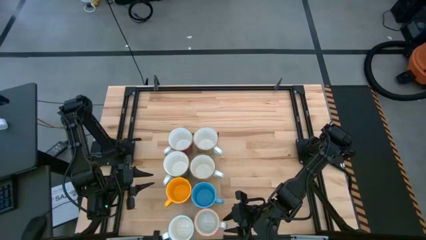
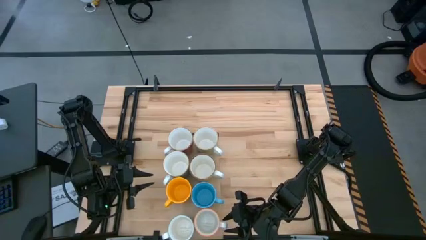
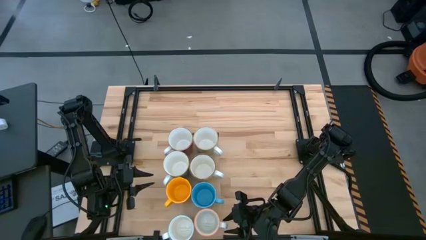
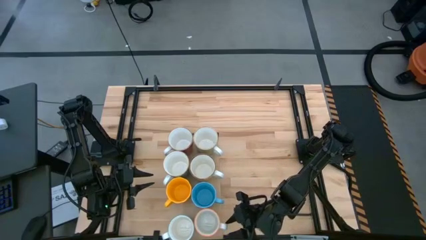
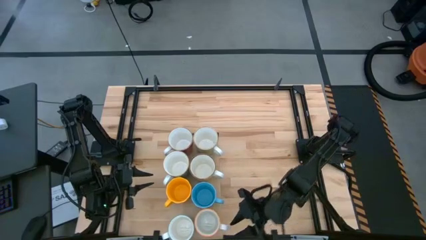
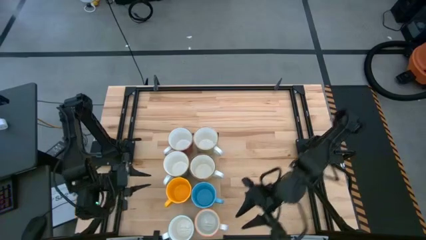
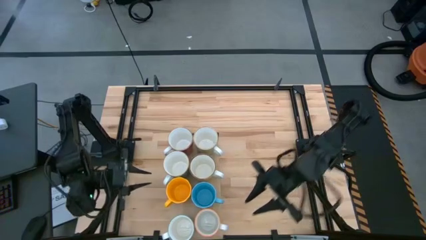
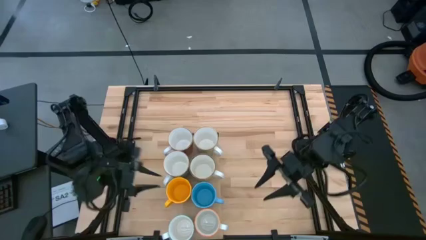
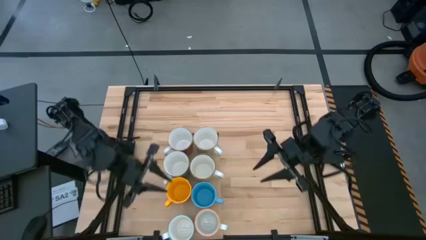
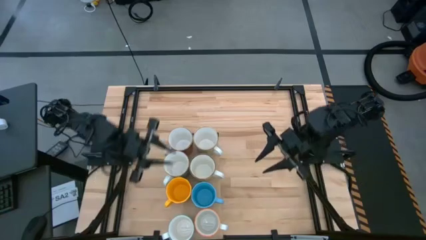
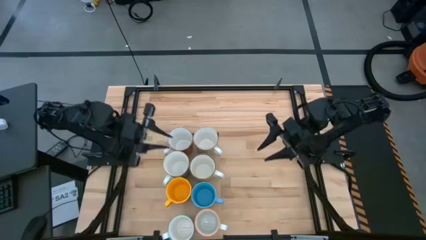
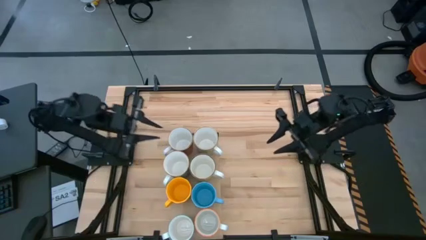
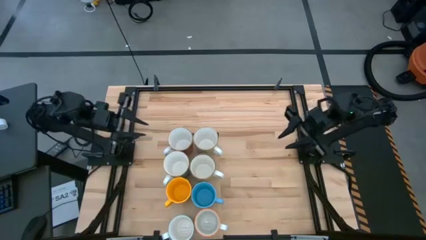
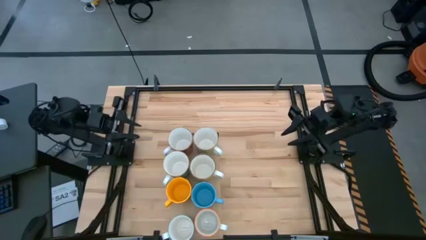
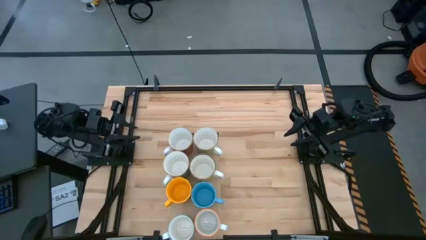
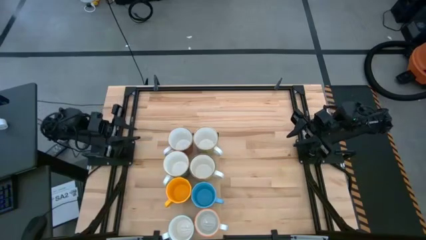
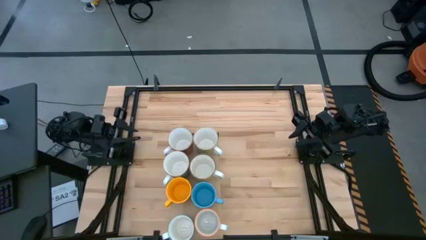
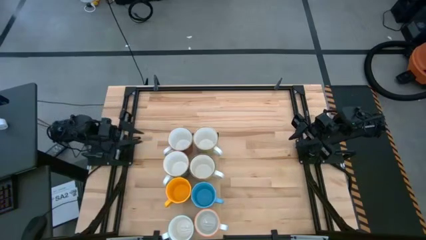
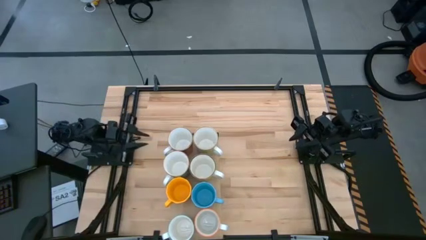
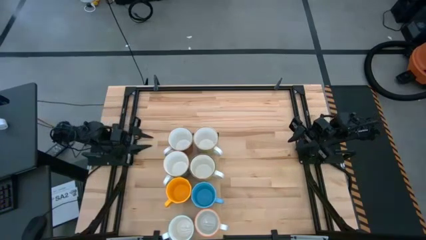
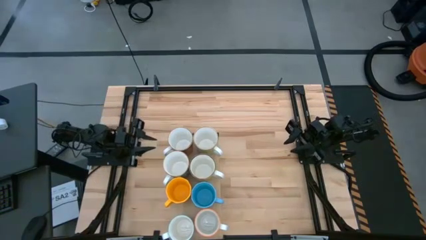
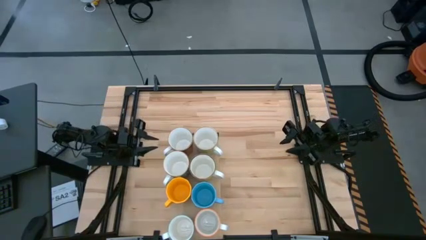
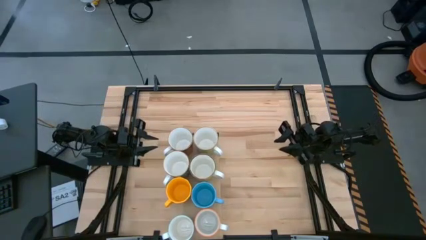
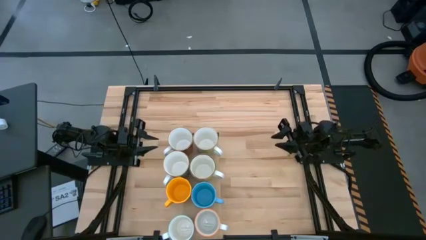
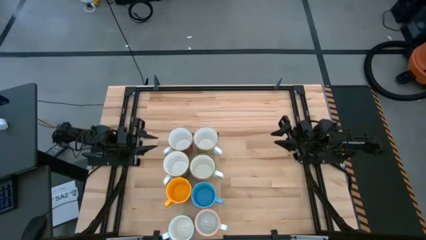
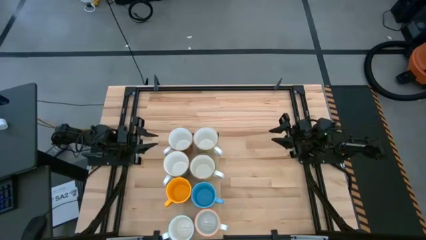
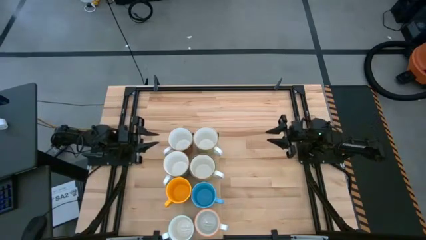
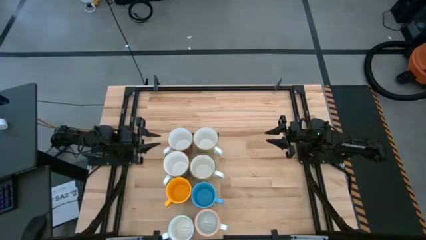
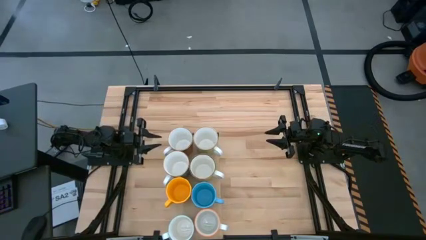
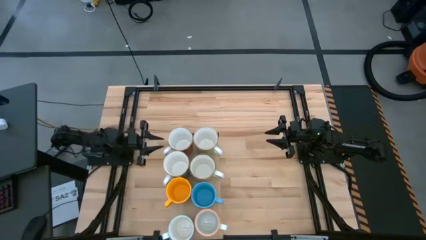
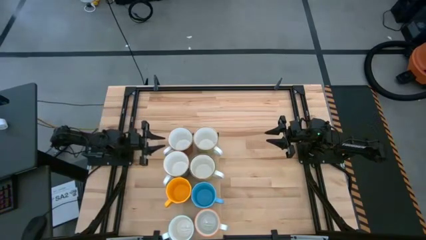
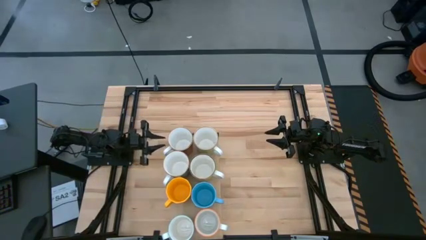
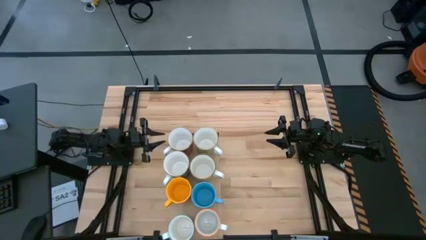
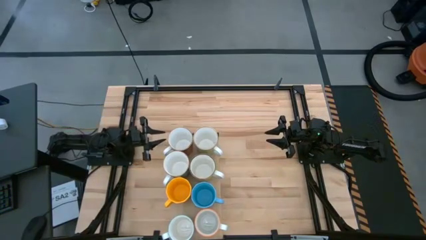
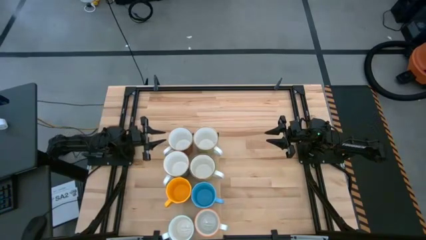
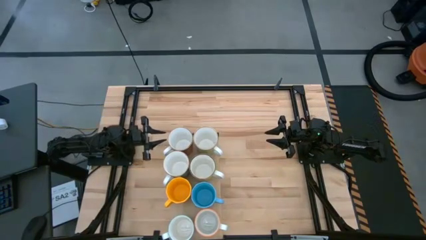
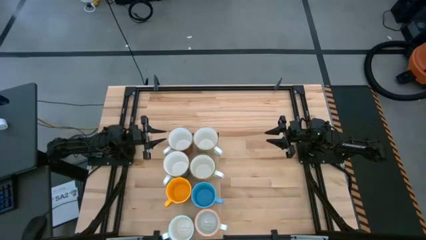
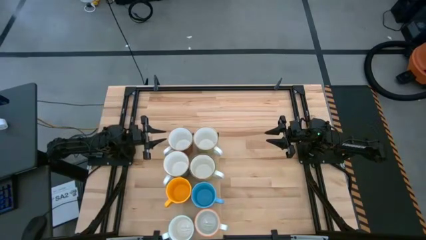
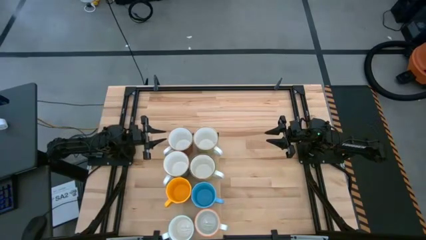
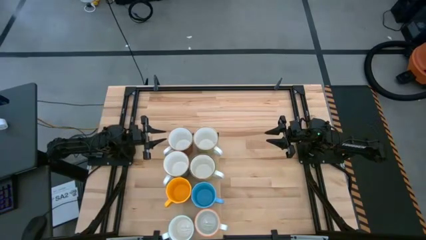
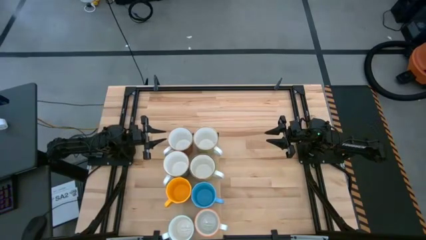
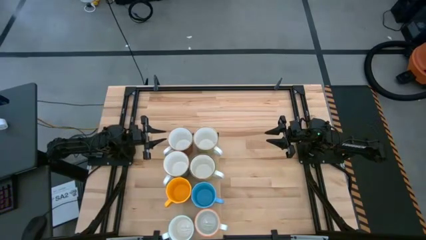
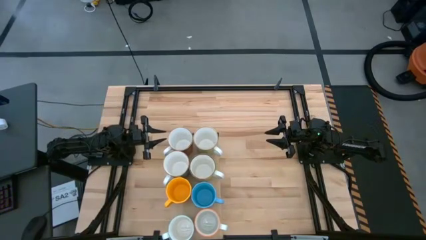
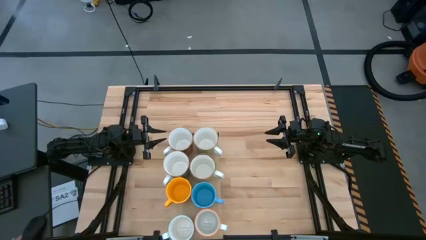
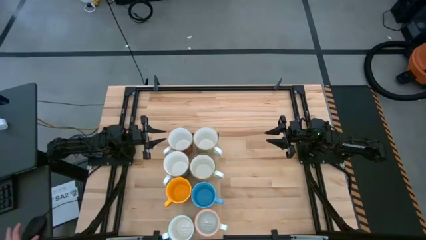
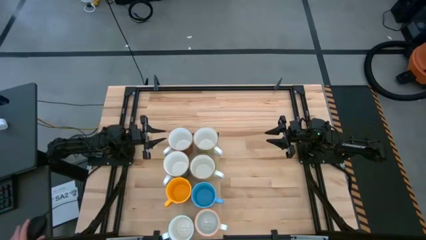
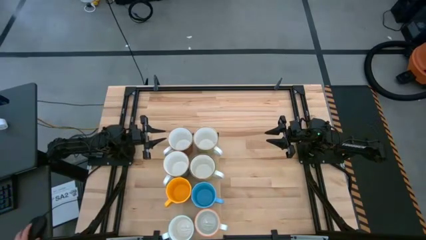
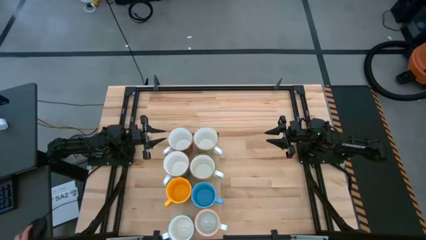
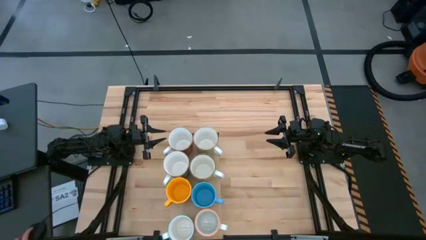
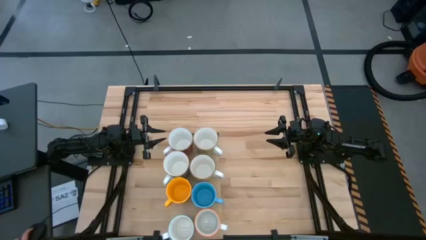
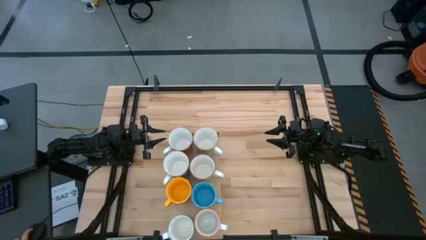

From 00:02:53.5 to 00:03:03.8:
Task: Place coffee mugs
Return to Home Position

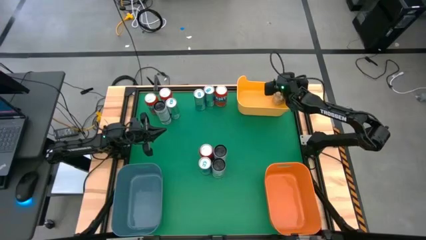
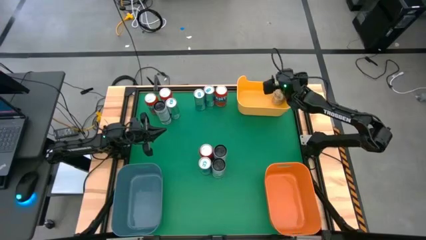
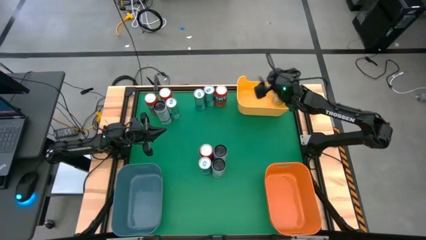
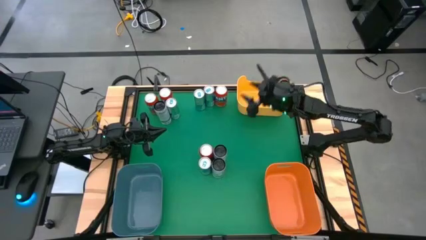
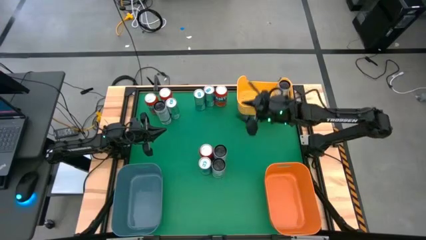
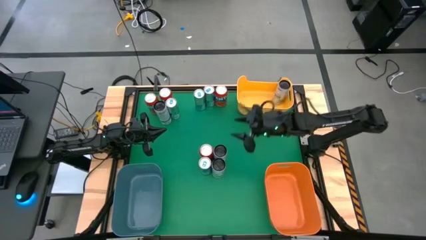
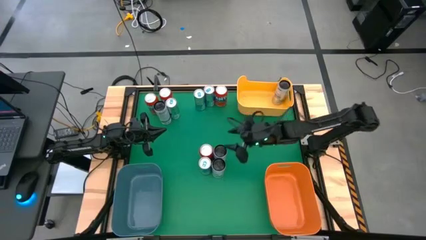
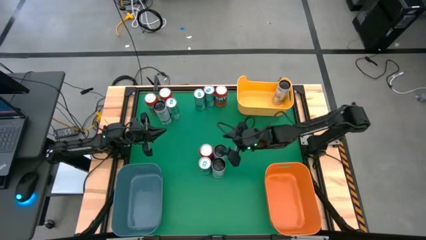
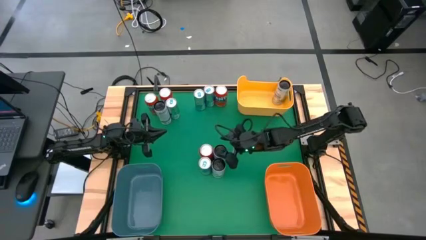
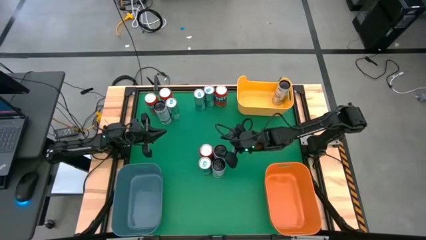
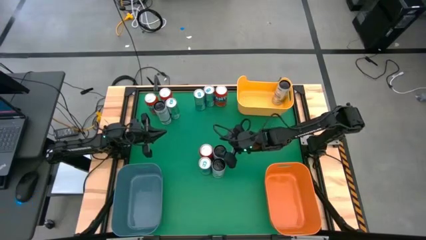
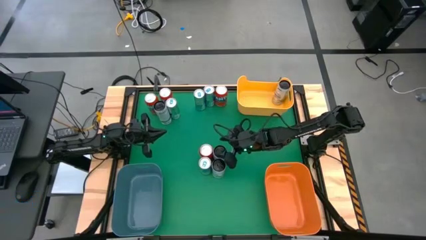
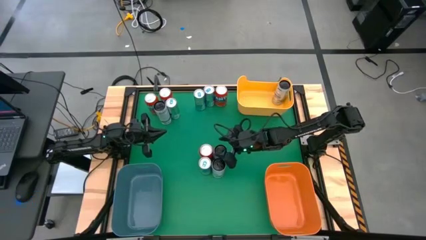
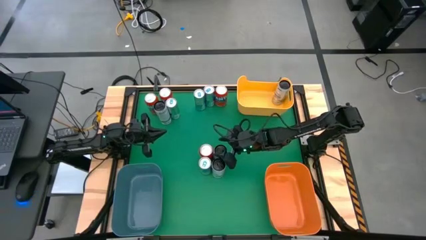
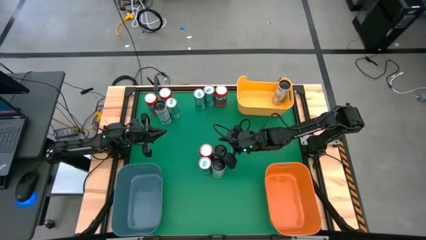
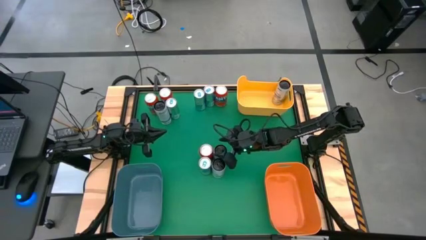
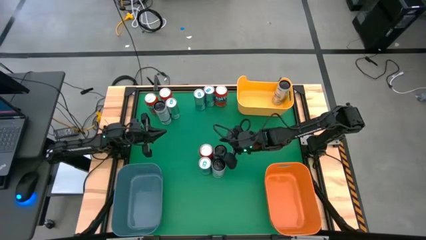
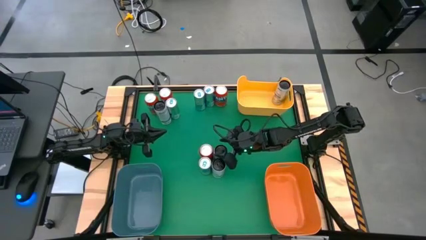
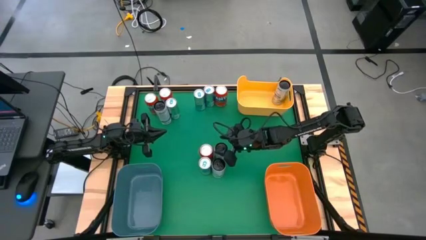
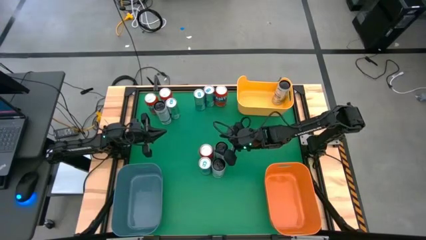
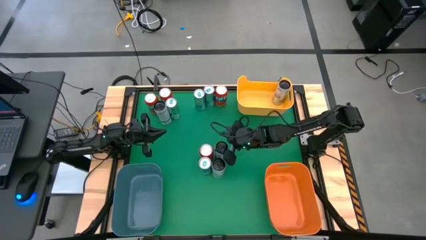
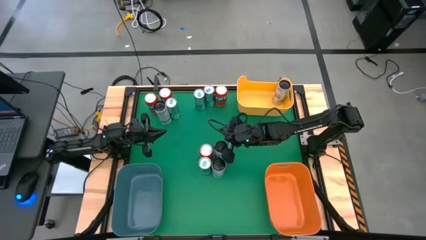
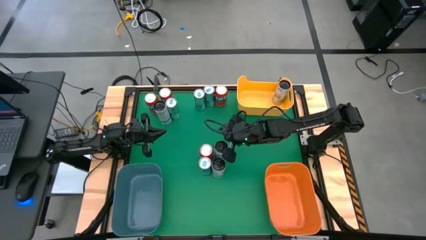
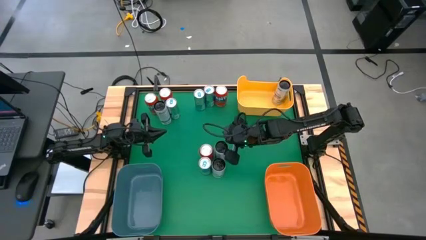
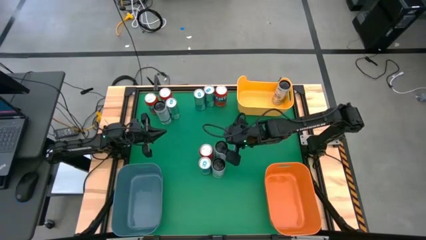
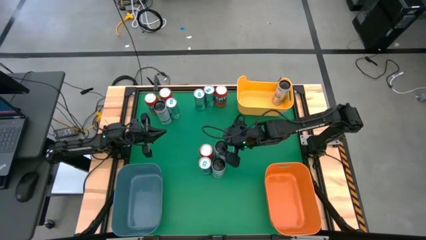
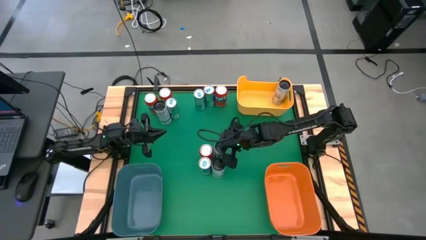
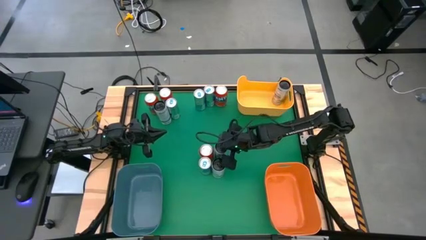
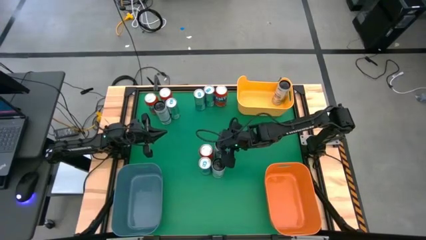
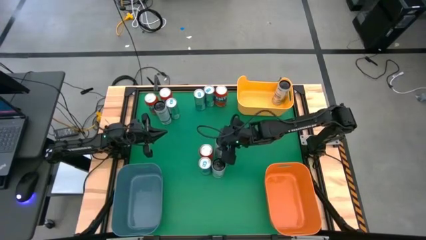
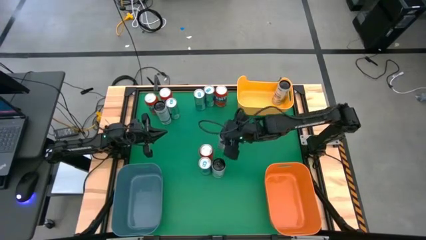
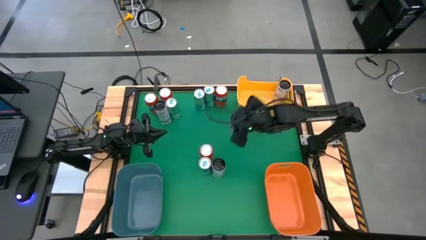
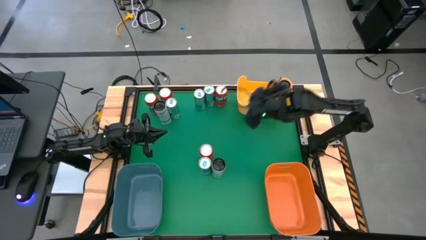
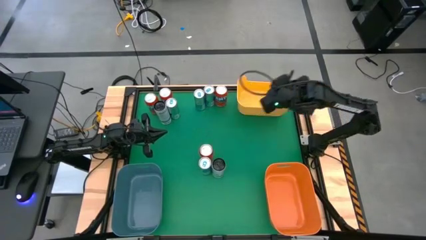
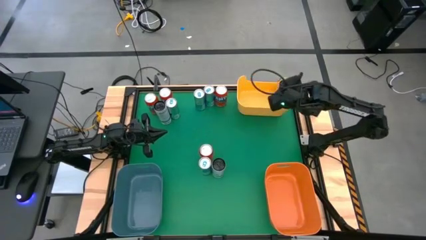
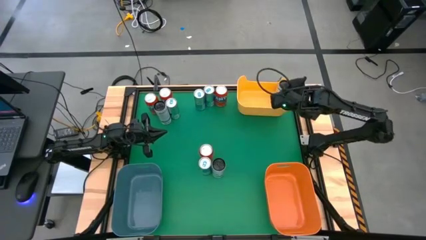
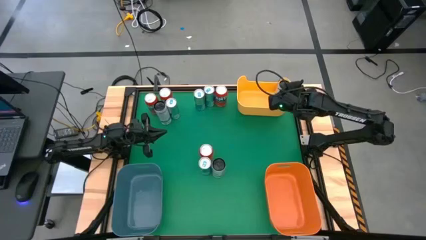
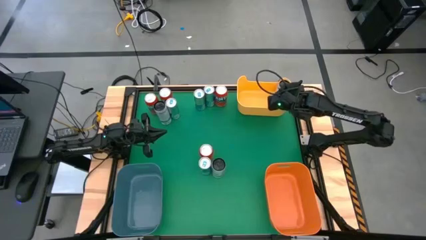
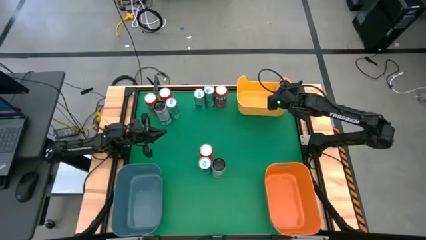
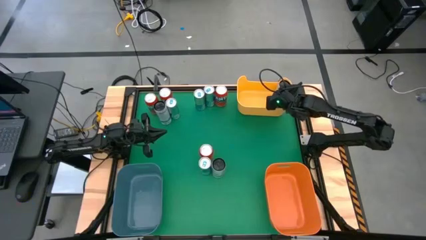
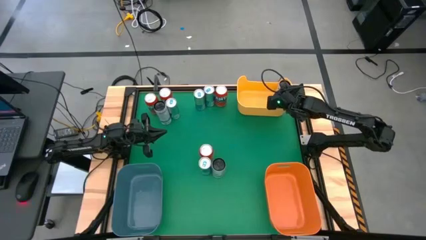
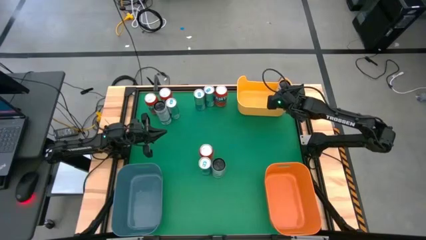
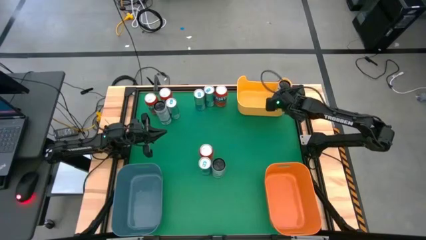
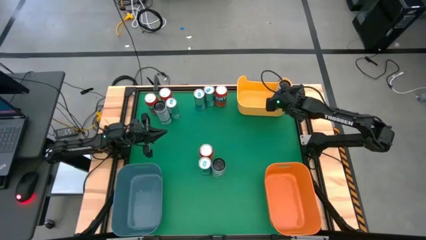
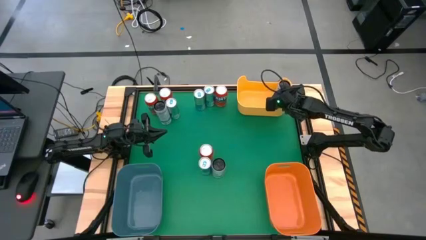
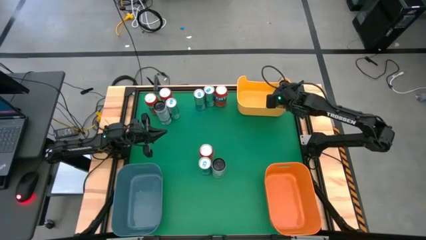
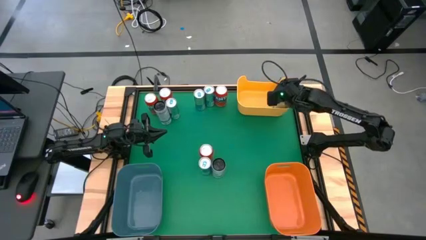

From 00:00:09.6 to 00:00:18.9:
Task: Sort soda cans
Put the white-blue soda can into the yellow bin
